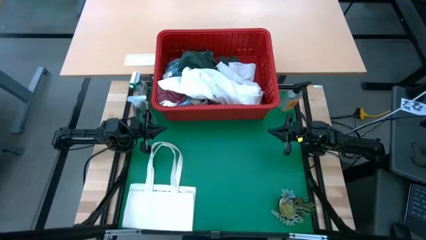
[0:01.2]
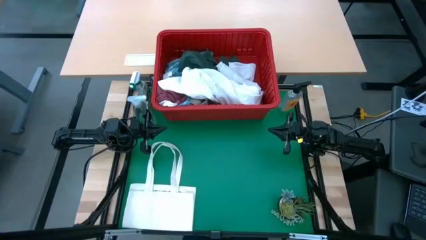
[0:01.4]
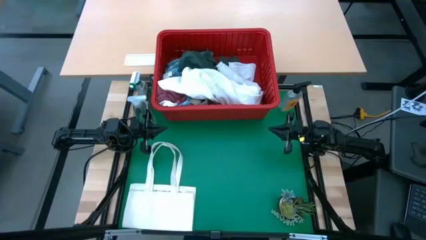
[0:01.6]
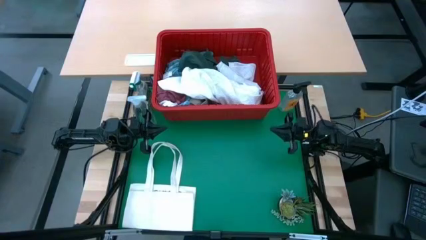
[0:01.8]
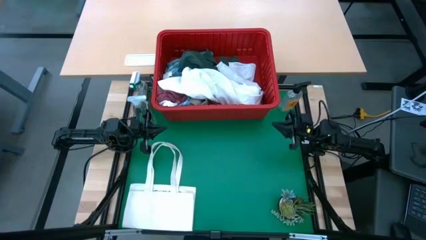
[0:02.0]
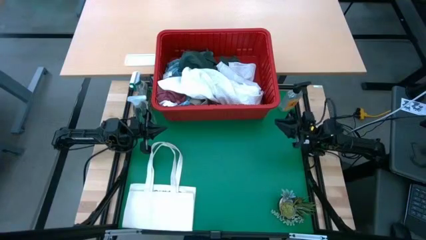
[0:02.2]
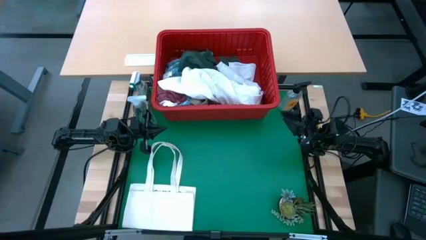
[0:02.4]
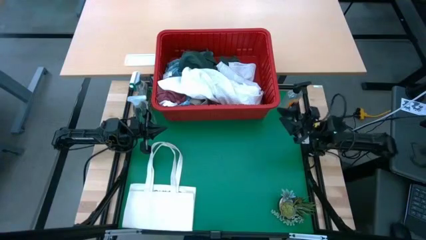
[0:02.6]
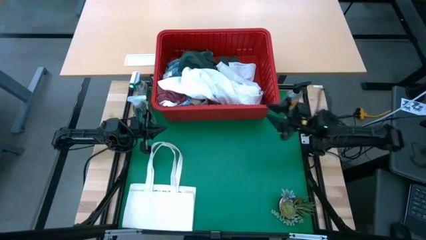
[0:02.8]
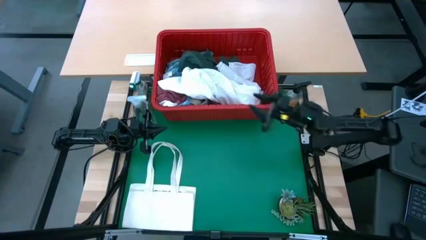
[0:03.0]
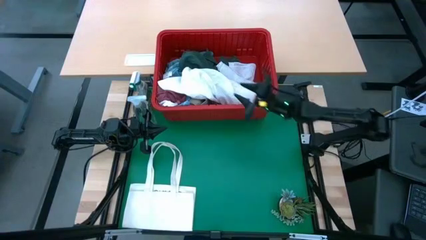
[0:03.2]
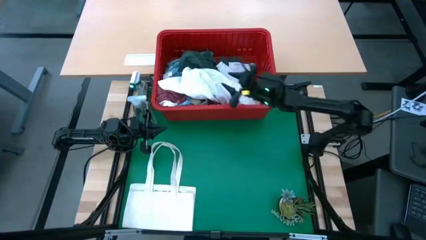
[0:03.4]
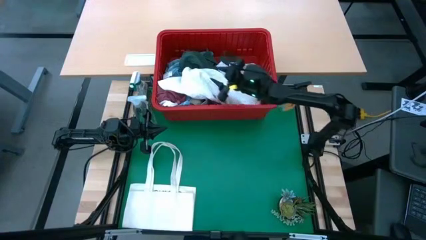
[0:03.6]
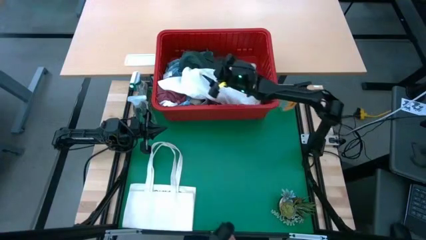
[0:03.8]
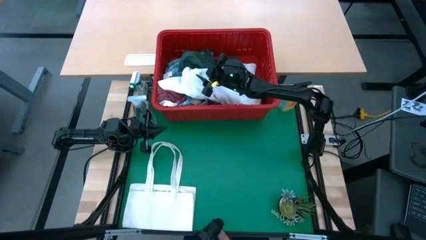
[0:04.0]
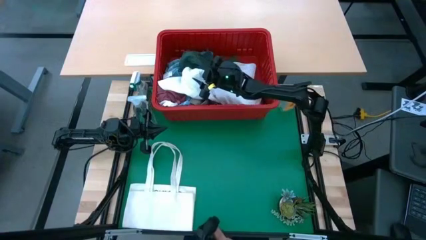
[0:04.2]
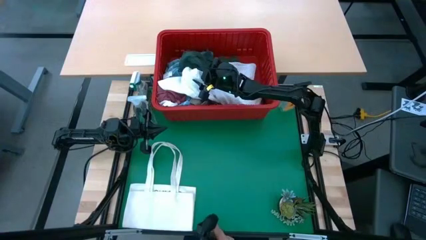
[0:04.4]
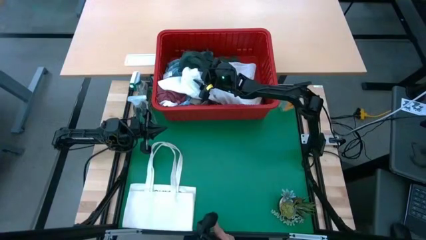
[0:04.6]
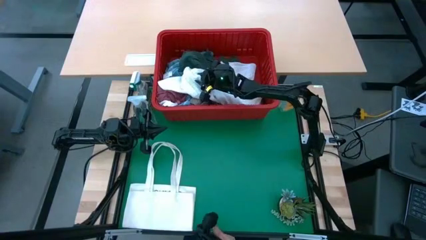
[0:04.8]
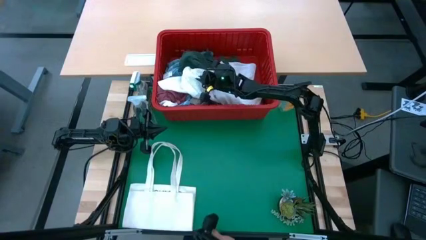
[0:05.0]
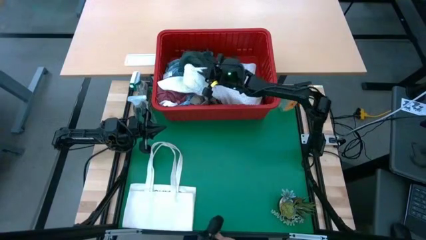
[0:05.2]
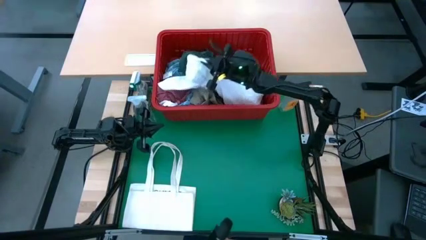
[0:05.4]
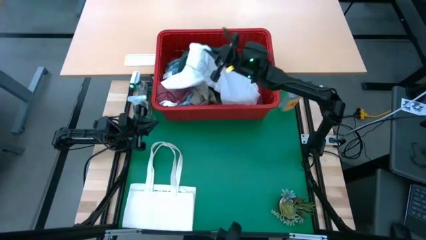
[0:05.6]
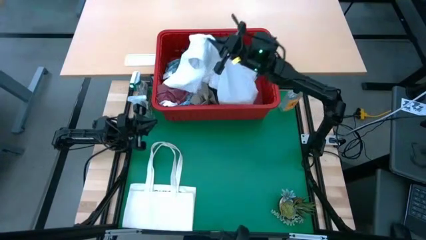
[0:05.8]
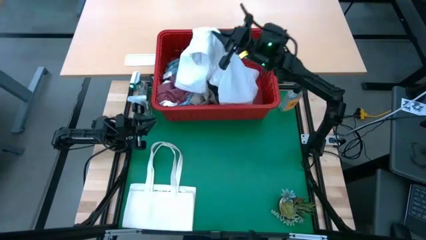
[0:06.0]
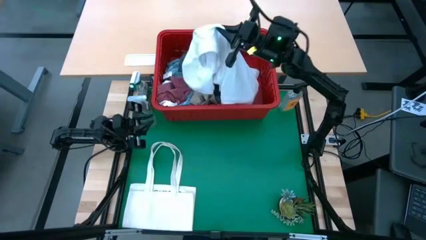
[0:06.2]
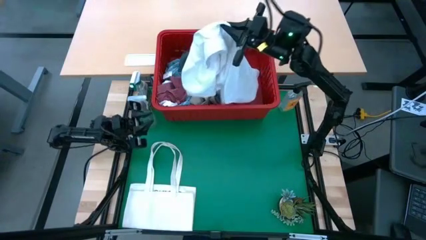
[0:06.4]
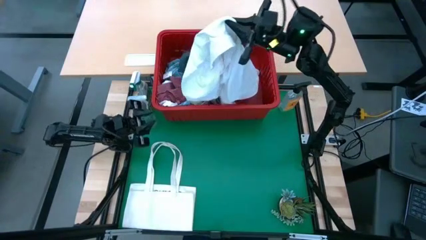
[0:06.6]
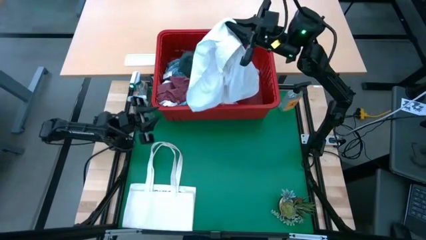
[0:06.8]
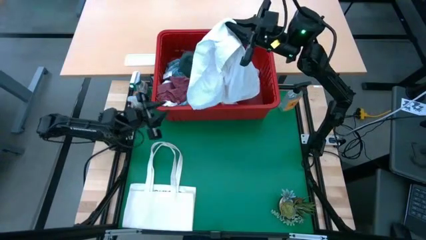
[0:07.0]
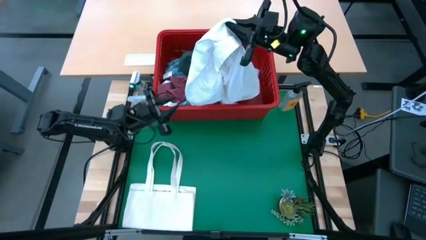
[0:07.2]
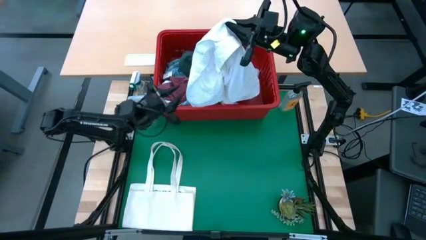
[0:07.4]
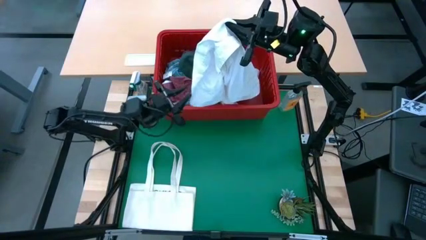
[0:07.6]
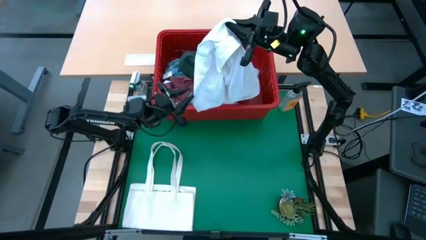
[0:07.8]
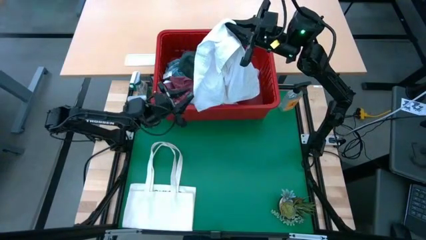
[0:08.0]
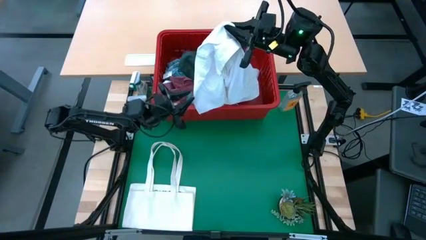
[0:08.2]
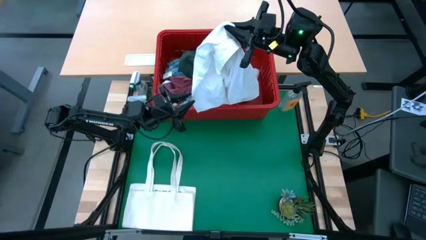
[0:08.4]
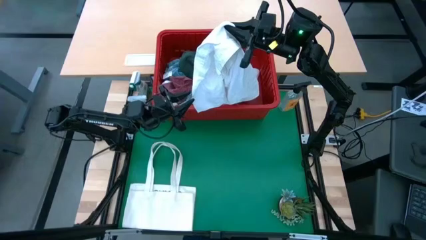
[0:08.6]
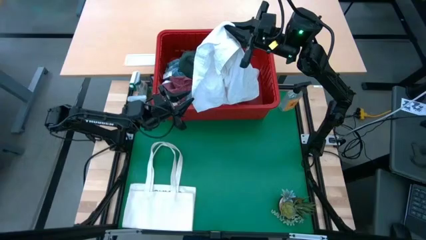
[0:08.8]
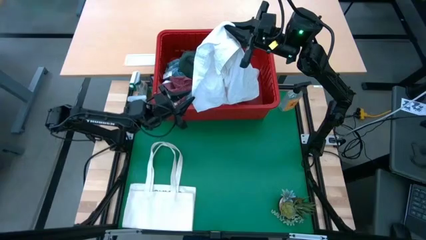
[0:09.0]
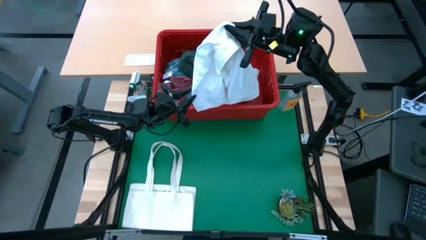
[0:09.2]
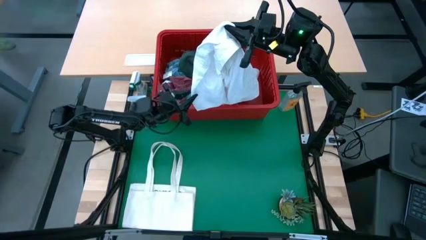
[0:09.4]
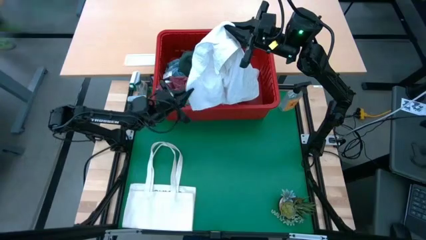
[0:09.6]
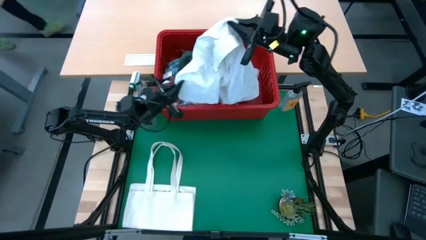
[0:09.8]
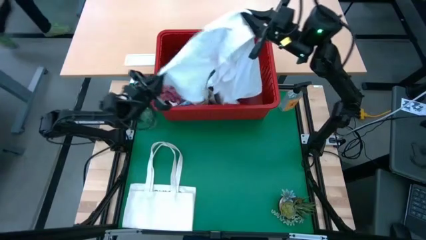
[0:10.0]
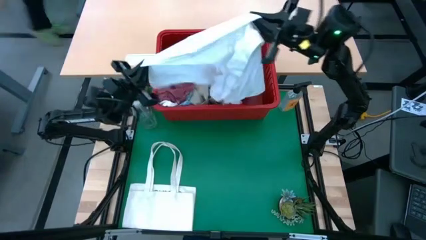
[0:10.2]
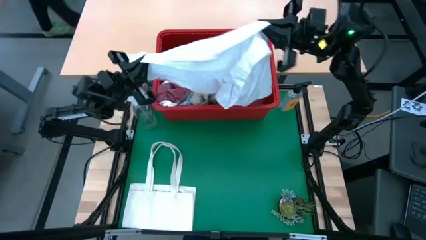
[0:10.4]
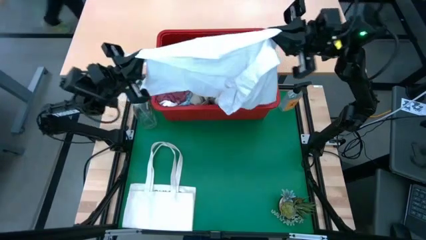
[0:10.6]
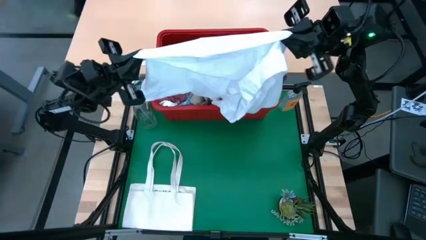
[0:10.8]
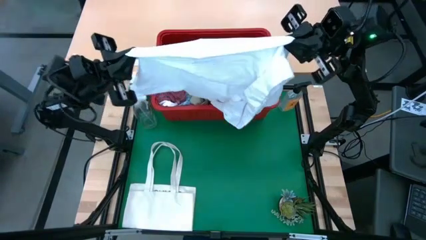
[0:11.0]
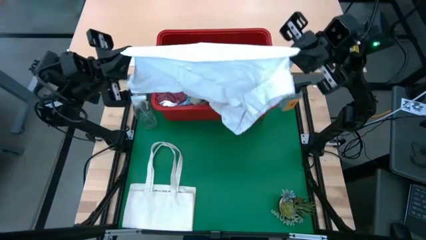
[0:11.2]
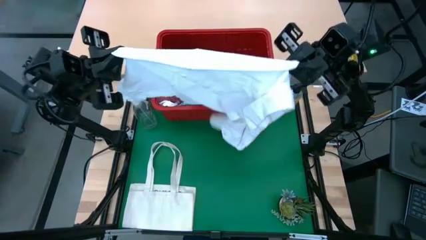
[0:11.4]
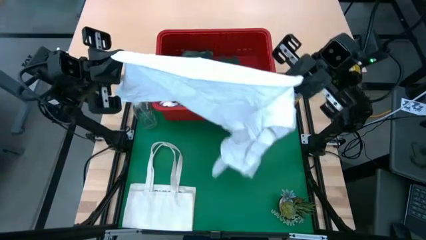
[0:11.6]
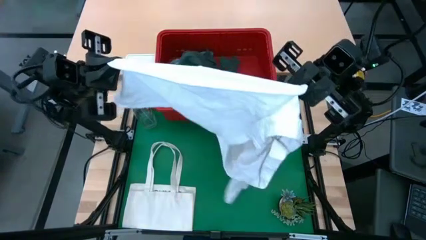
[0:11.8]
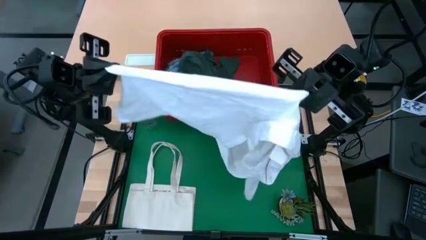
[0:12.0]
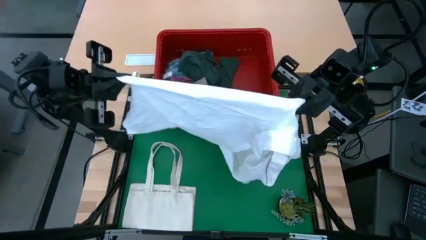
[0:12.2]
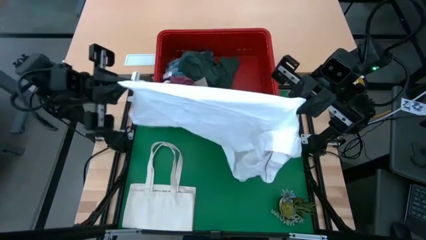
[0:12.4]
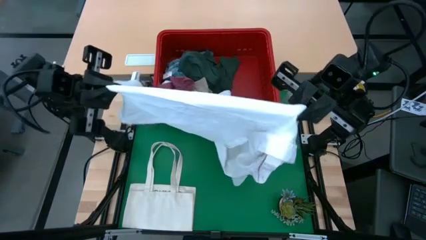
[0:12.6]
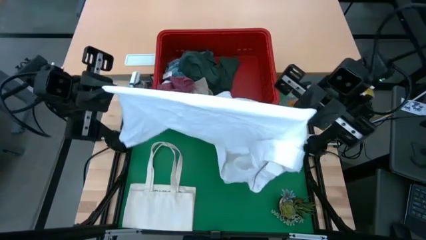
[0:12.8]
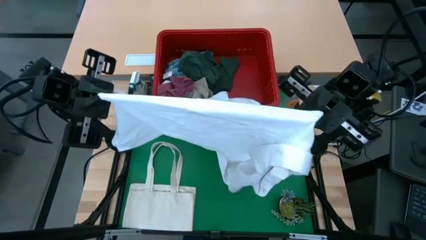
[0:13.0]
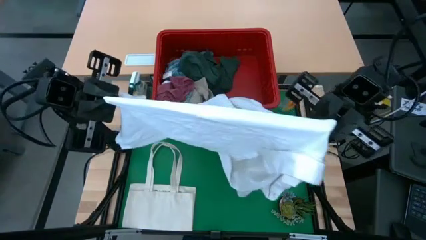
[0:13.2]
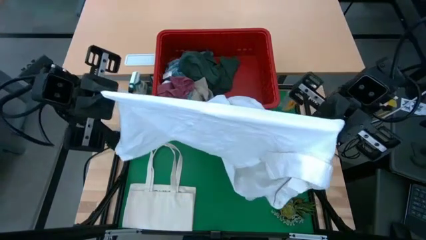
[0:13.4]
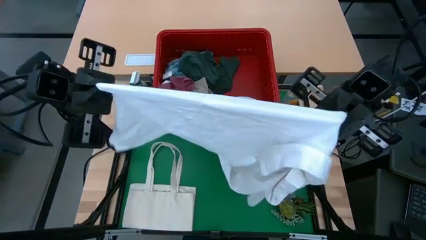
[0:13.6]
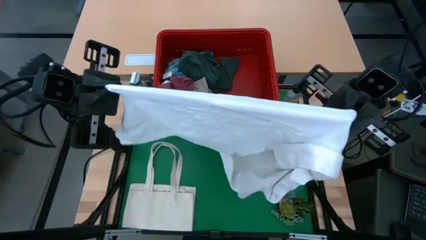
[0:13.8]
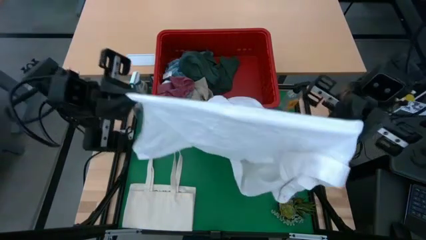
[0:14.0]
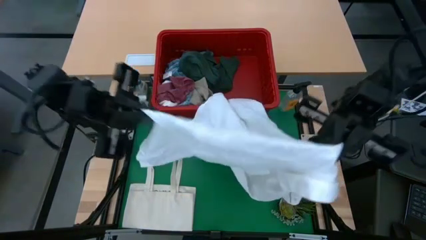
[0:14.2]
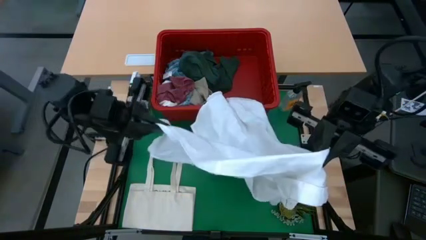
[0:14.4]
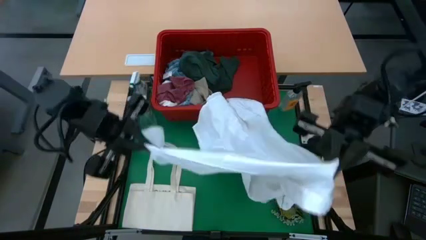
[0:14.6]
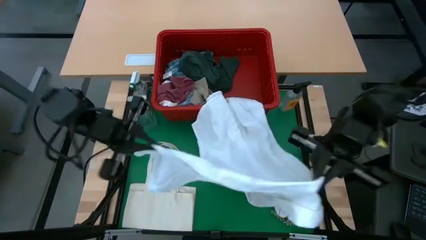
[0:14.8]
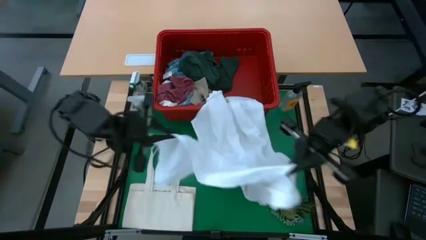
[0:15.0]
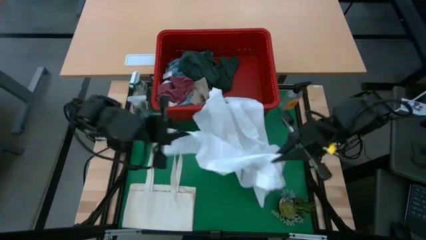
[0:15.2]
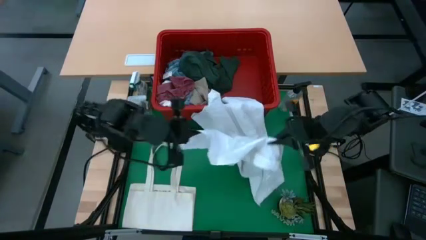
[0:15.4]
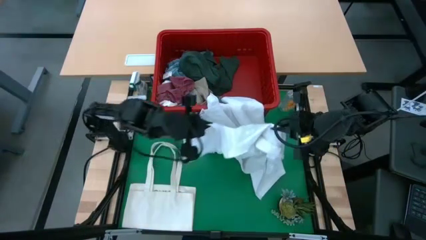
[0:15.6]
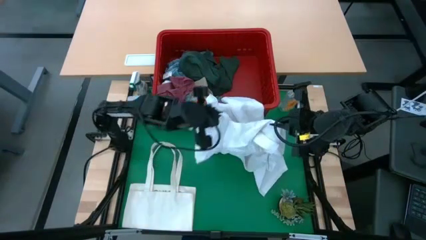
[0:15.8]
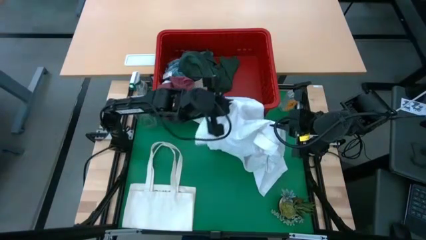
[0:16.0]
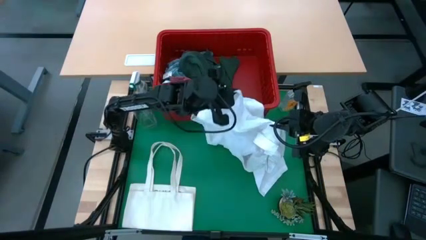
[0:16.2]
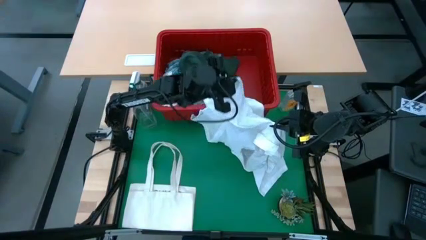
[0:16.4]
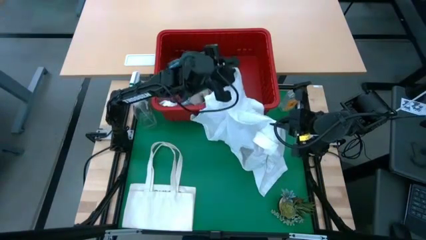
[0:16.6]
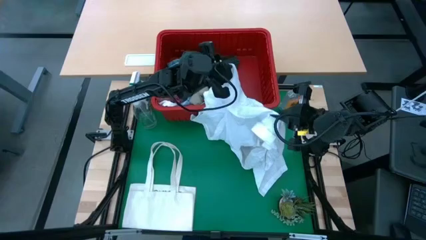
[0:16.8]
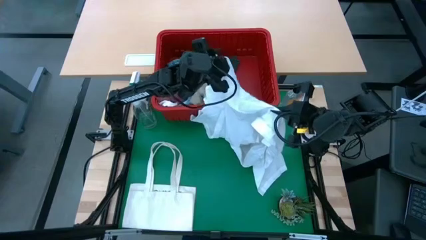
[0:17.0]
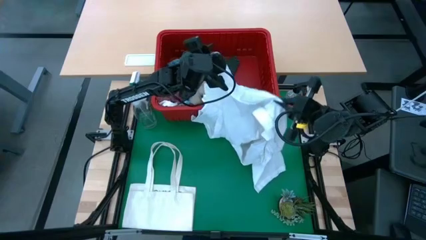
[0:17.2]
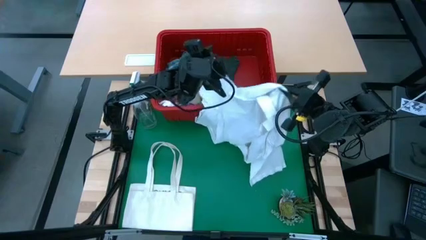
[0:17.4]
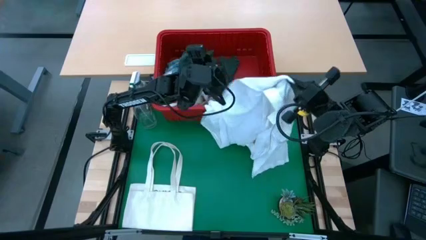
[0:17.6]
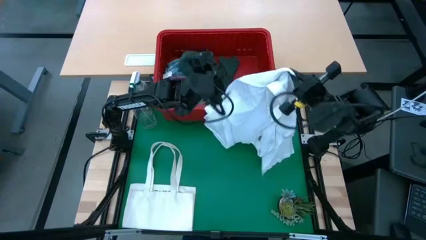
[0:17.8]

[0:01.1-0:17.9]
Task: Fold Laundry from Bin
Fold the white polo shirt
